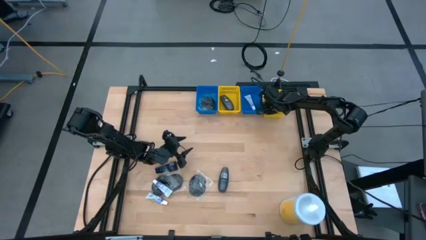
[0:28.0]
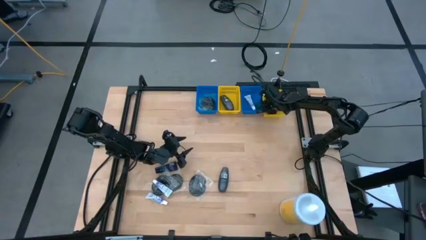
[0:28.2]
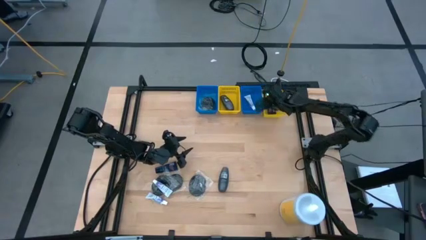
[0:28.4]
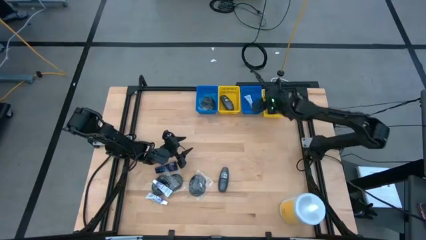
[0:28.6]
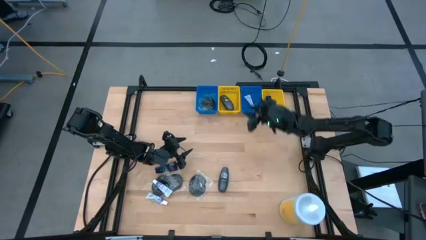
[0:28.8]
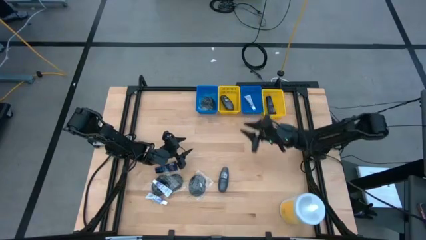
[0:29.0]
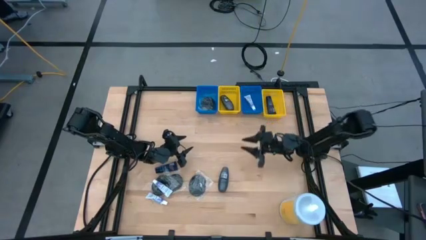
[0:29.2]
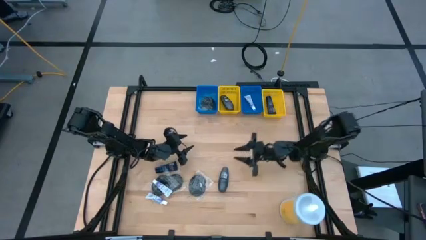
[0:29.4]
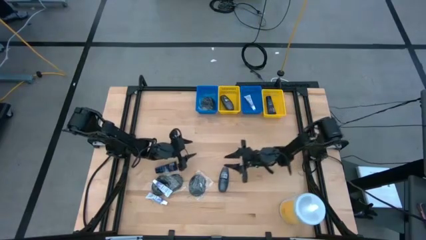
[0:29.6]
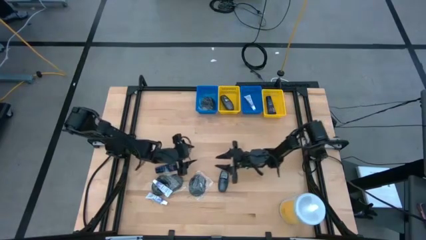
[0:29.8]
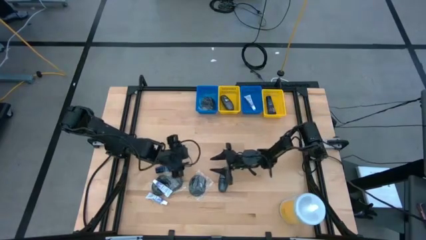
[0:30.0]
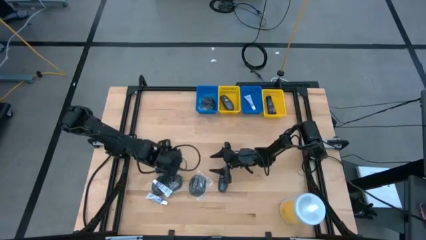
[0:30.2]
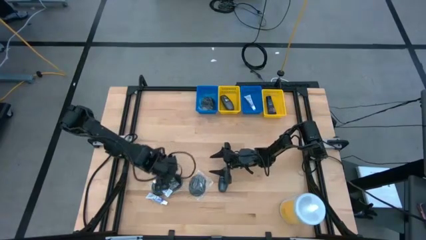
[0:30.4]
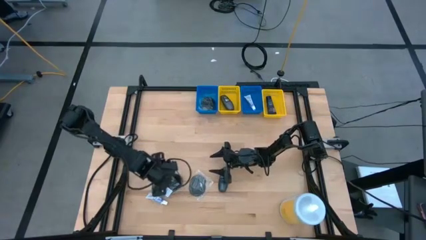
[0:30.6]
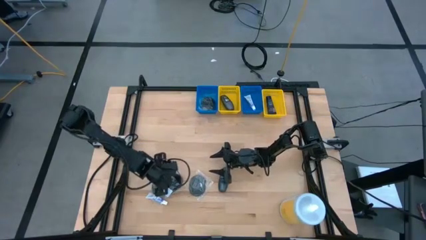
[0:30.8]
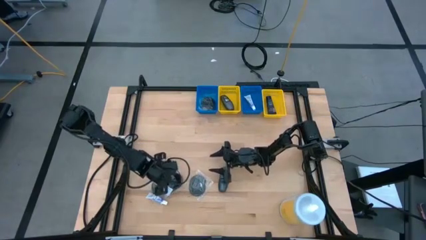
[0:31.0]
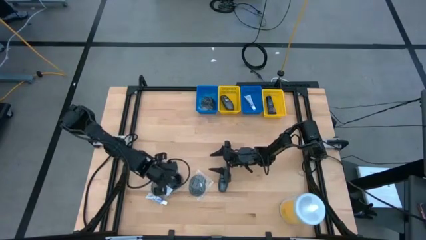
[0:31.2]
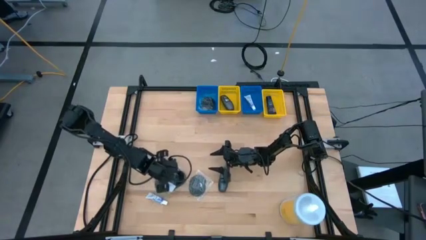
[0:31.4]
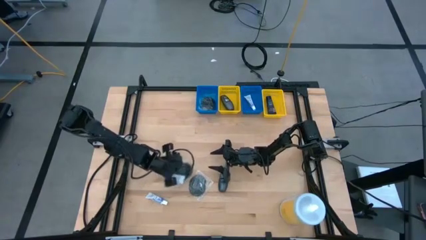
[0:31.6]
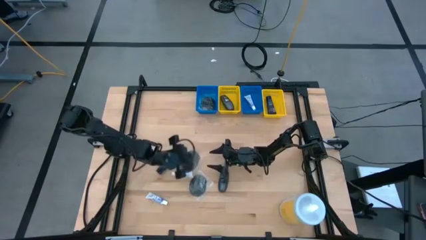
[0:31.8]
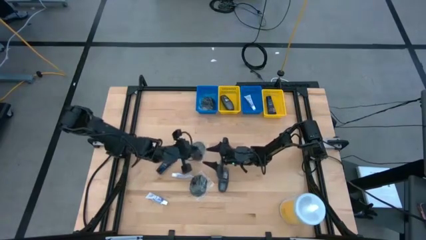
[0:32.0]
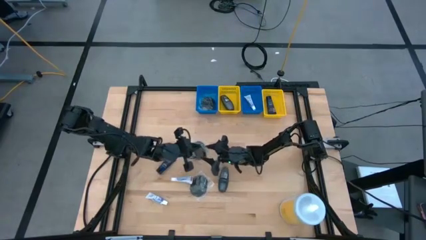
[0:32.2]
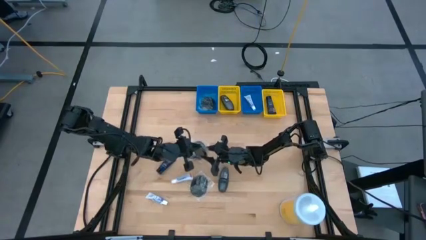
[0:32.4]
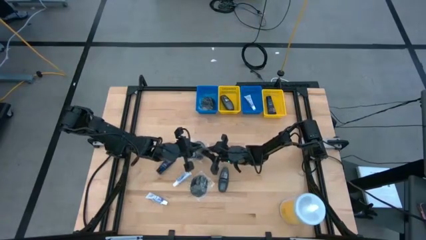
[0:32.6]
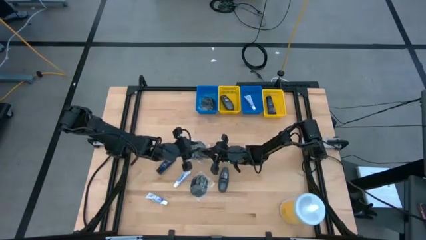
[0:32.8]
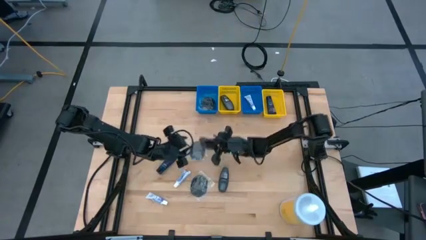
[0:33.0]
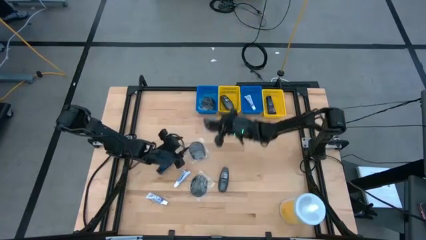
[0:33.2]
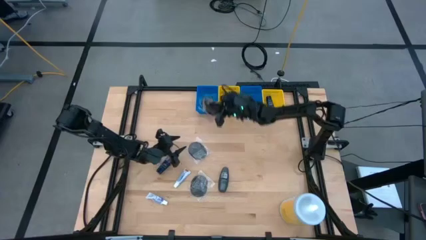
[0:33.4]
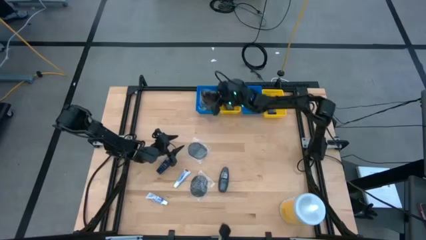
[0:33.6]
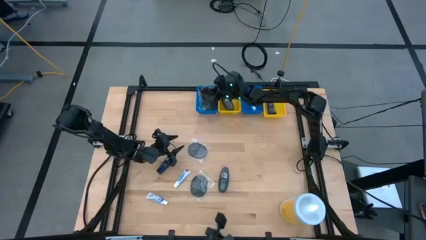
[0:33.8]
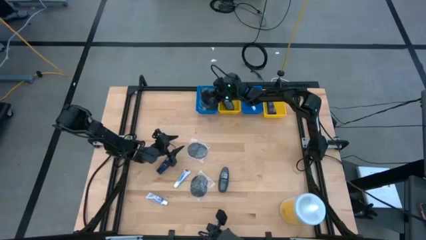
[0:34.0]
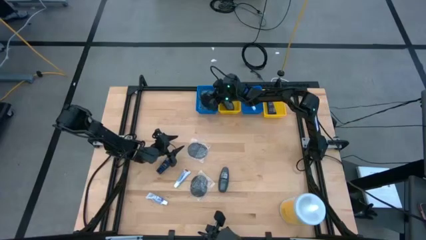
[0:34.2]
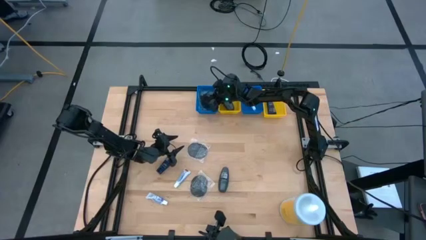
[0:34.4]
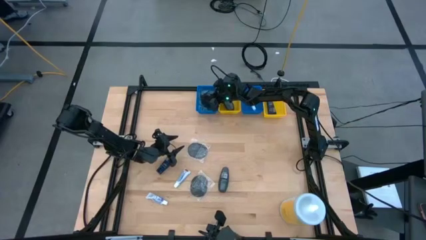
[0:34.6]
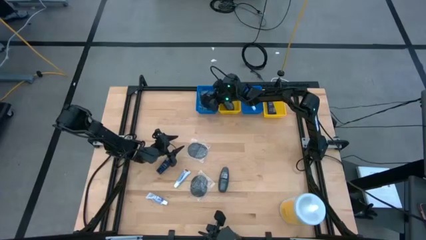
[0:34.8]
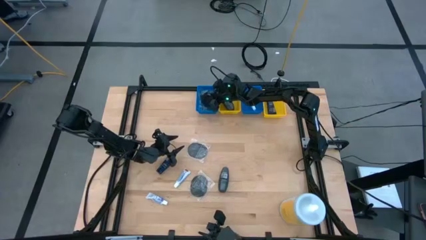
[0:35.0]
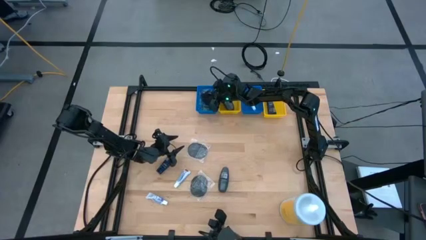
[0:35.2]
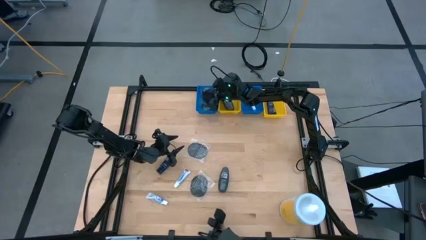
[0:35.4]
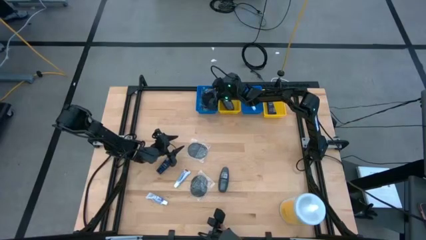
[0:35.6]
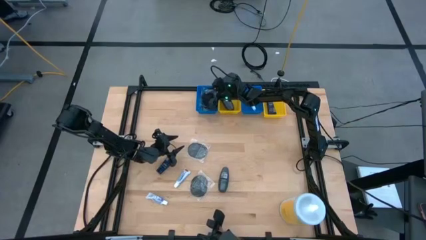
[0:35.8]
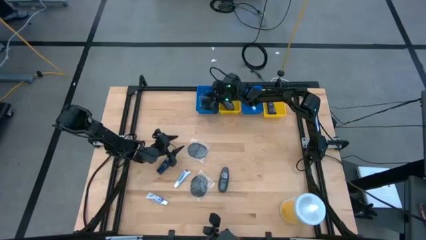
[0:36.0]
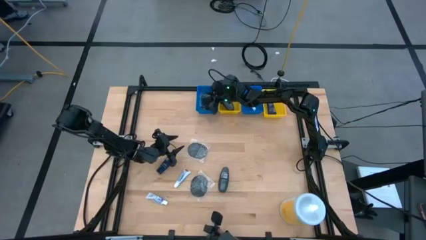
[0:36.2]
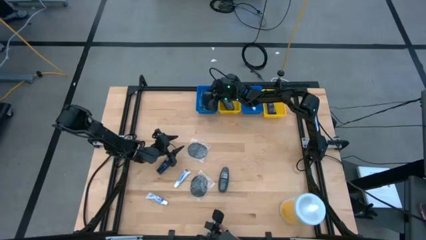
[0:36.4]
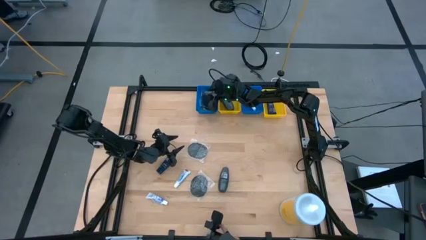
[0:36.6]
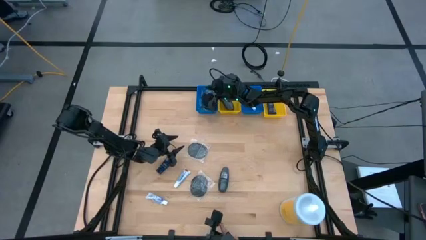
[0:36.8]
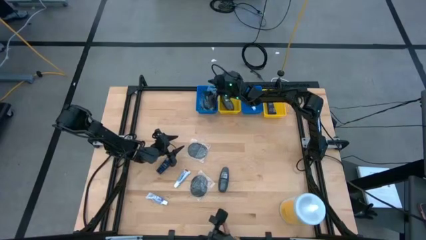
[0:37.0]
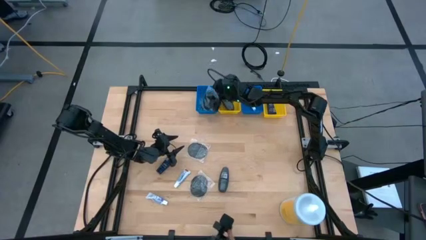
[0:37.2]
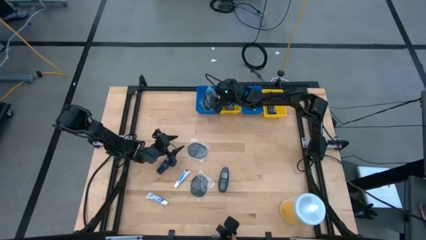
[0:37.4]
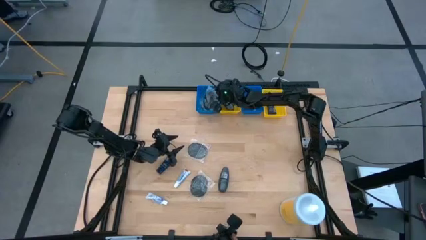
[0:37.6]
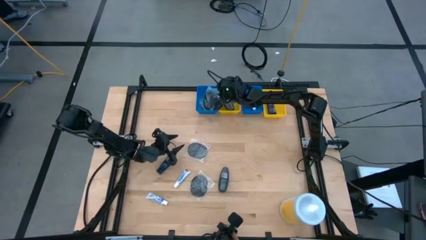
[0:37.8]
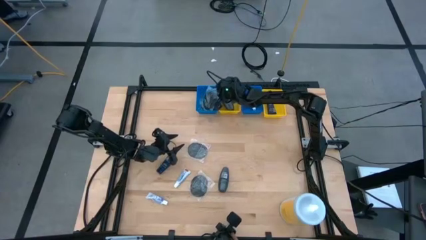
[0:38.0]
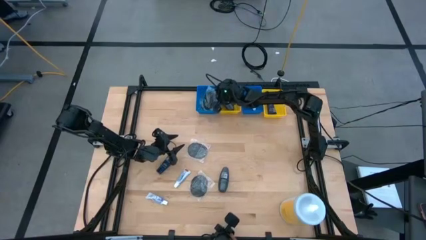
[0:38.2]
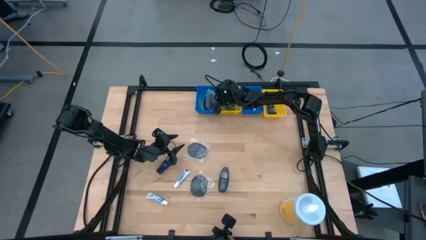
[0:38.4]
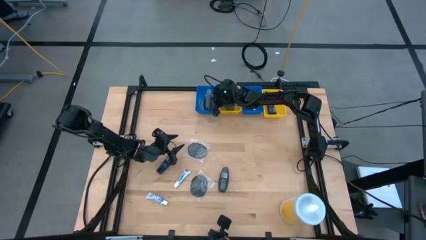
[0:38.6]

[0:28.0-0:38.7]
Task: Pick & Place Travel size toiletries
Put the black hairbrush into the left blue bin

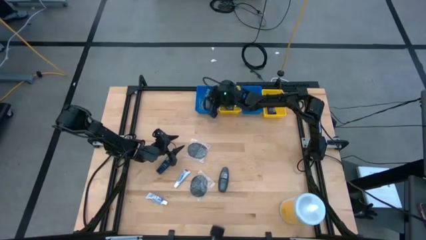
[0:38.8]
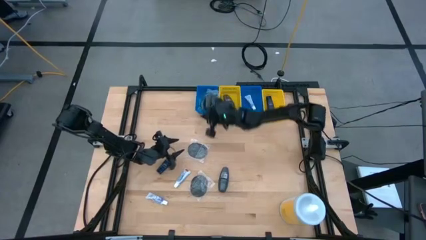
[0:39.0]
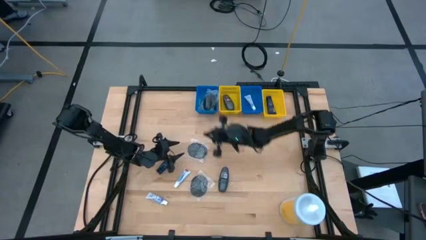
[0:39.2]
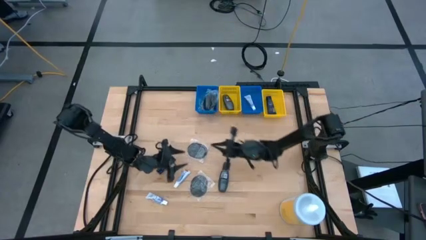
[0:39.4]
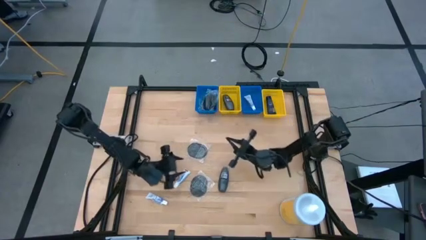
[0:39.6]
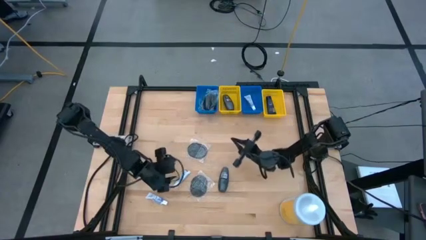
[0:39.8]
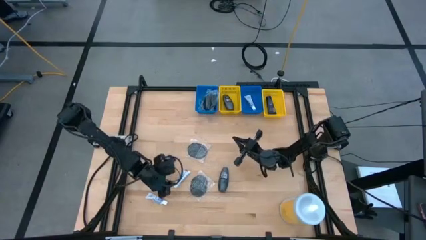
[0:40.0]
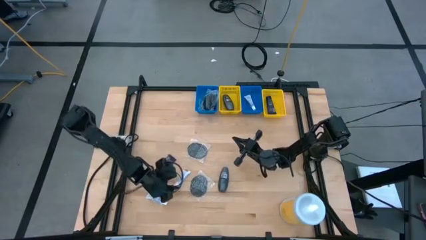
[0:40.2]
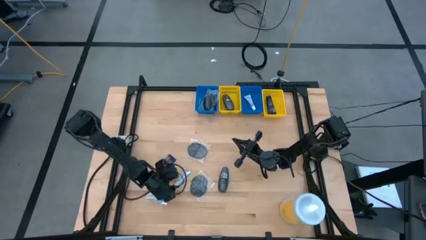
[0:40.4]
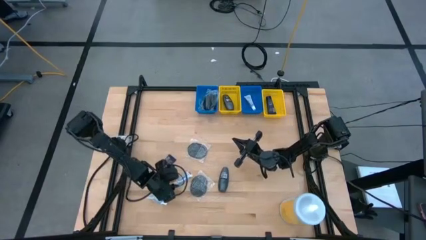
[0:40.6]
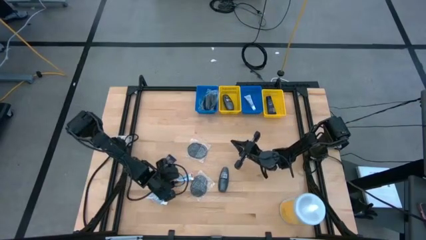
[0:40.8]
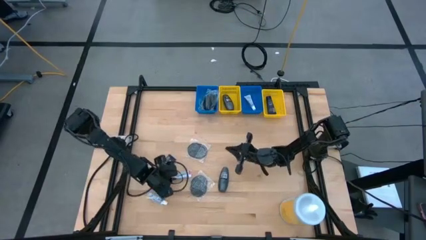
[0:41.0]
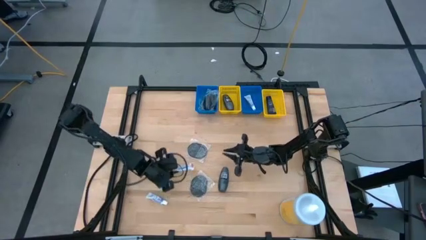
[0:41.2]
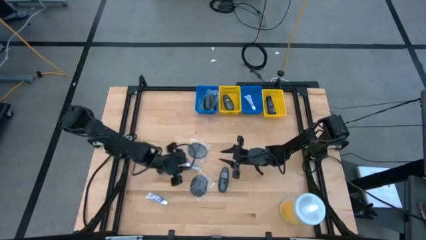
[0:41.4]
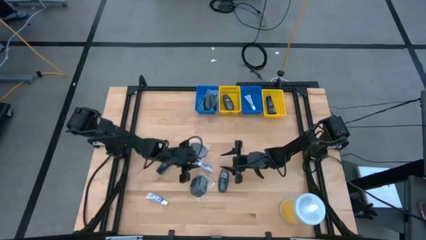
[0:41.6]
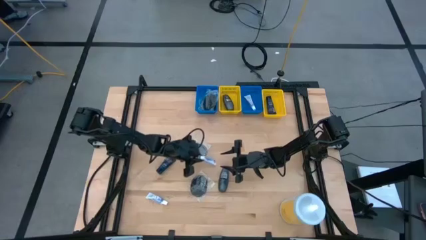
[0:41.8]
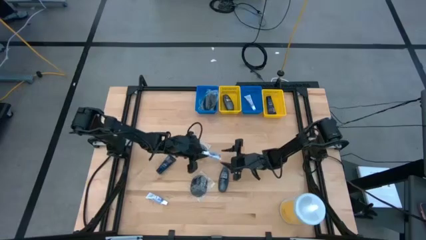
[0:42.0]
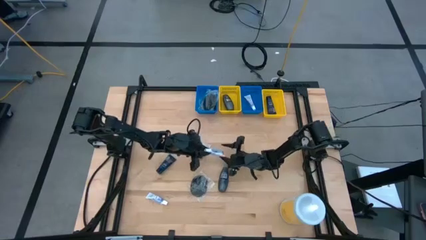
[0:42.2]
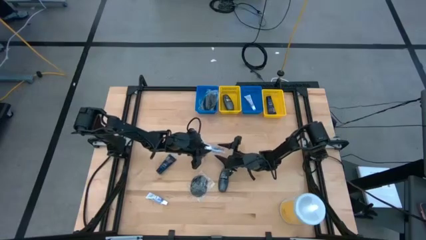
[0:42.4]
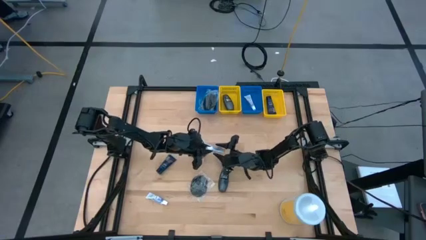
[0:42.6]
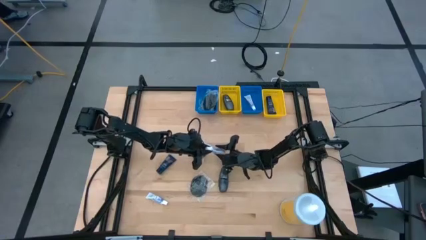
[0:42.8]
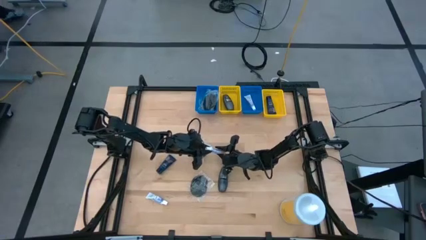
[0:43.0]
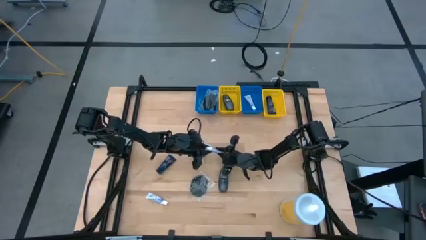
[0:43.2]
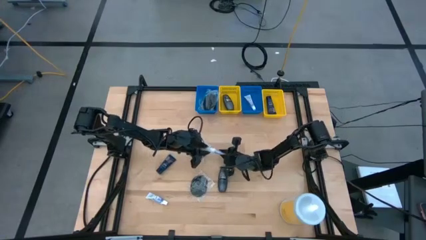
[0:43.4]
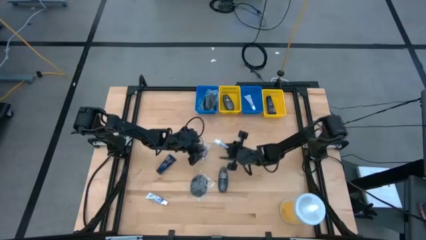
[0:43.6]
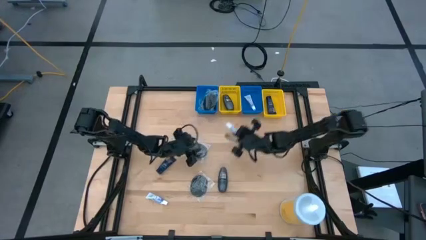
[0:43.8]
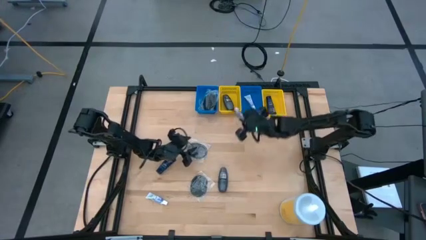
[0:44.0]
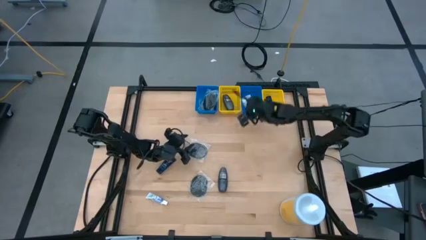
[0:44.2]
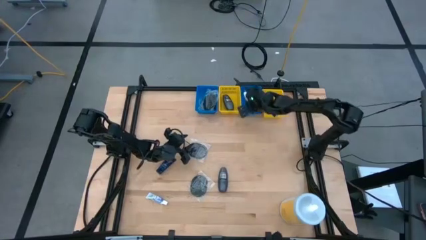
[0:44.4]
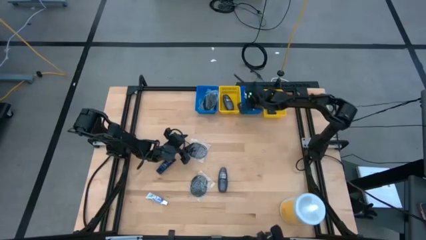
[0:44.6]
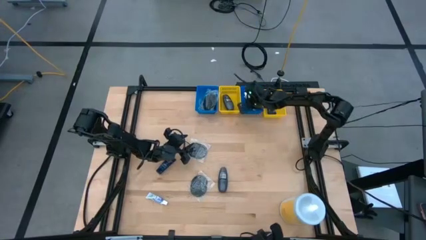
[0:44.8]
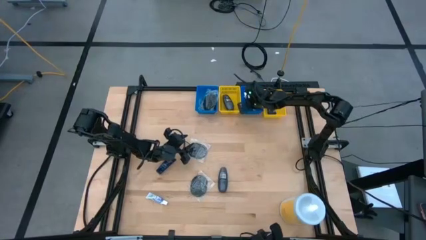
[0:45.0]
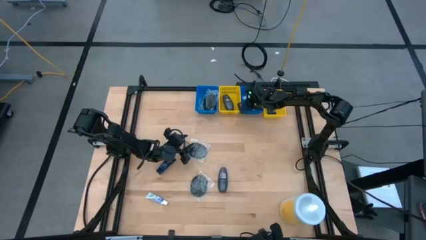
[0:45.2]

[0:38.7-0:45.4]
Put the white toothpaste into the right blue bin
